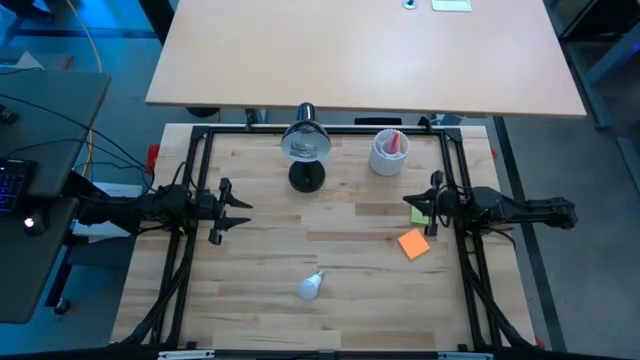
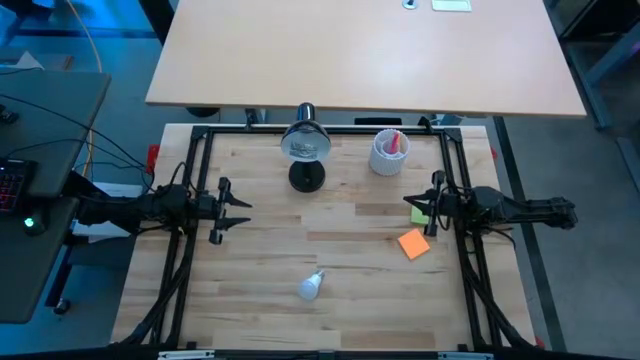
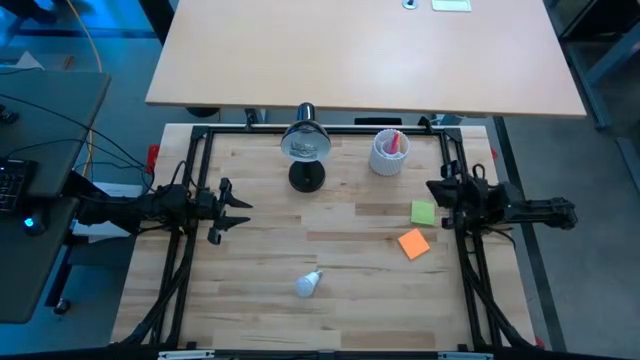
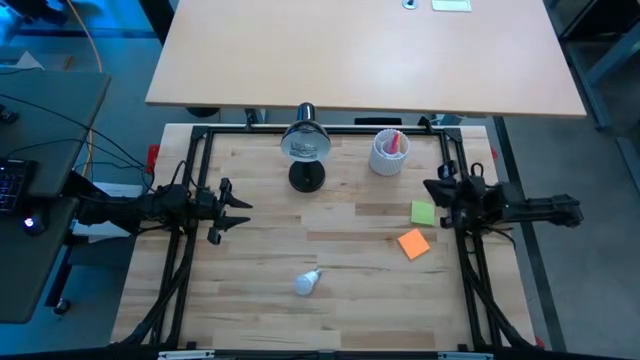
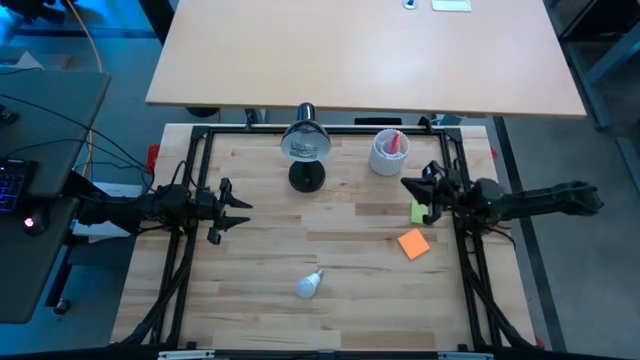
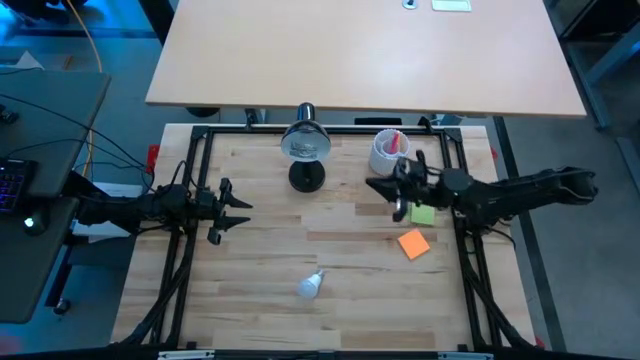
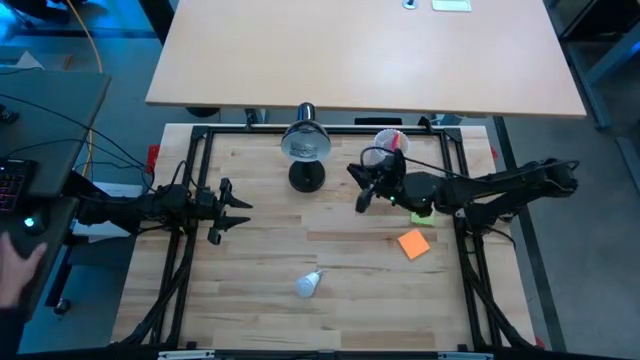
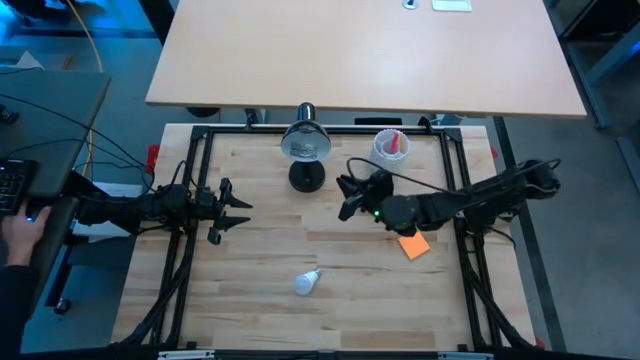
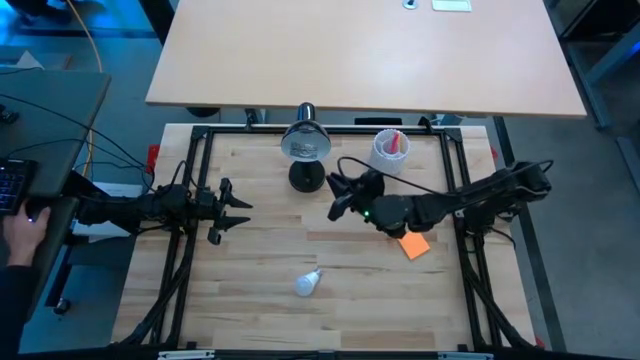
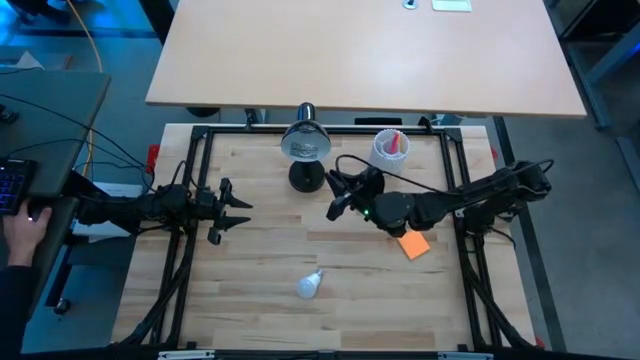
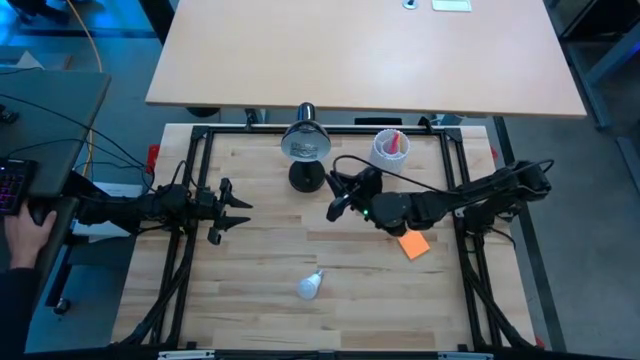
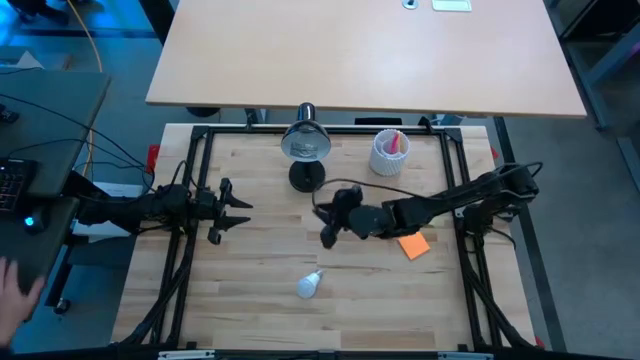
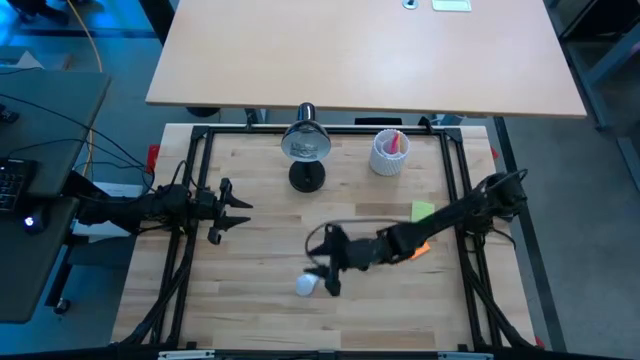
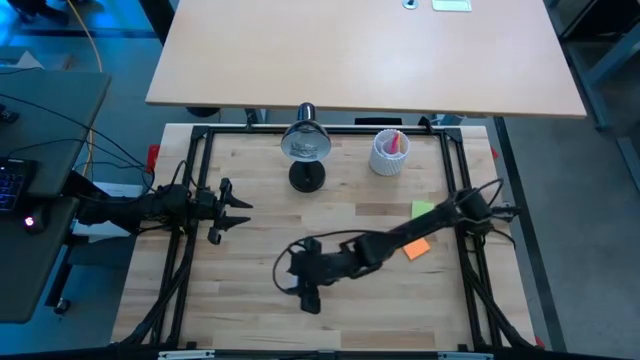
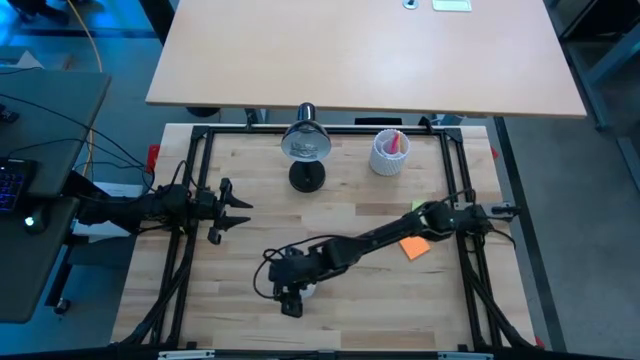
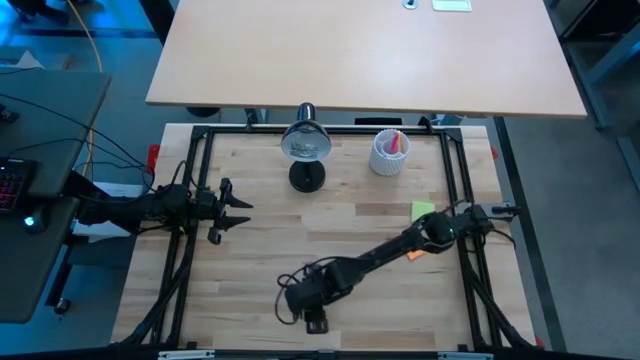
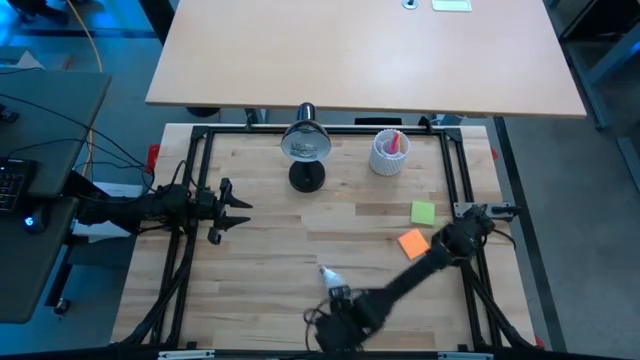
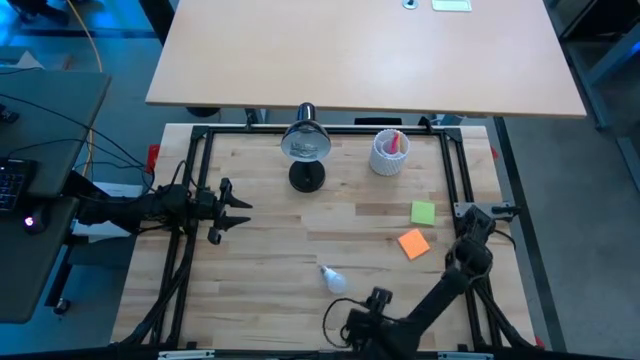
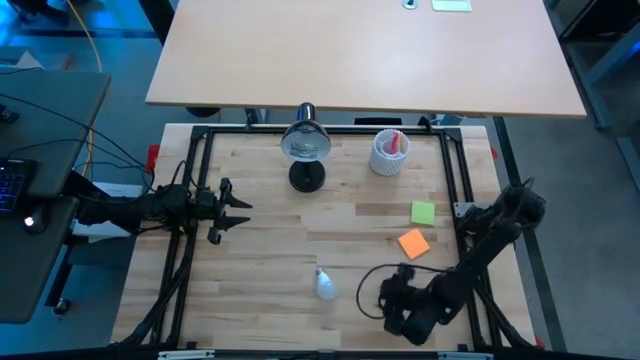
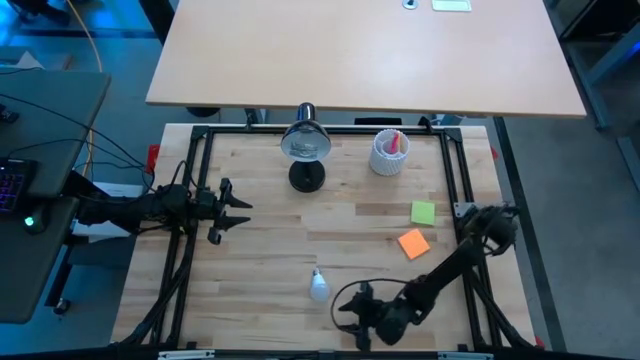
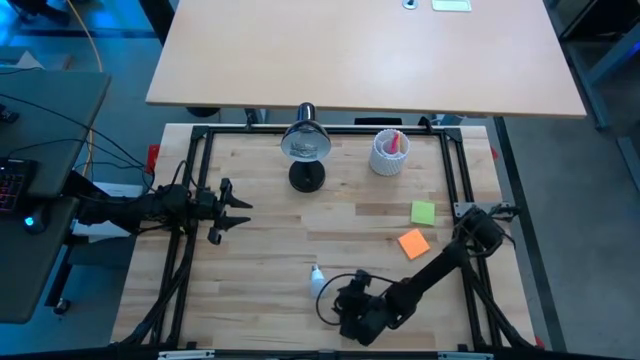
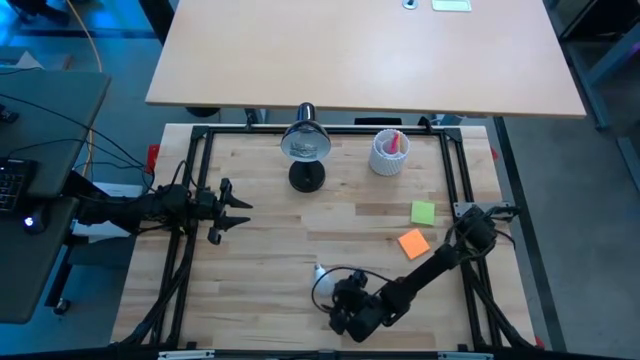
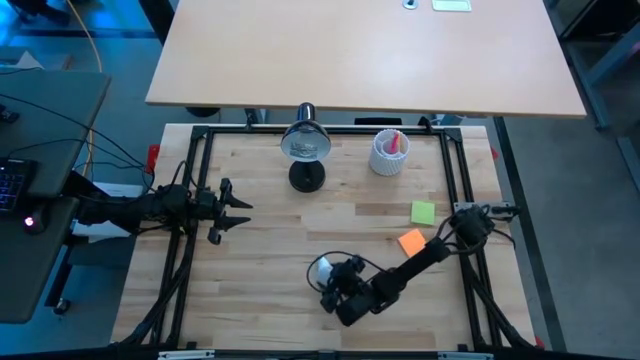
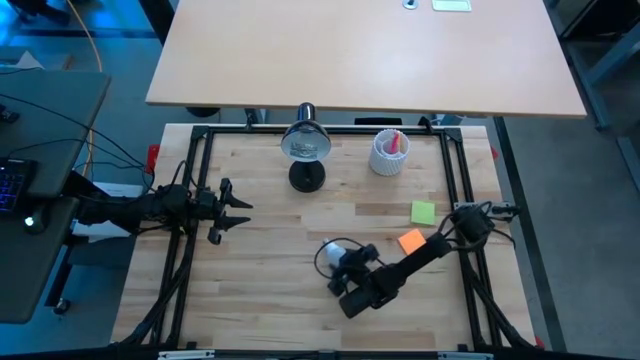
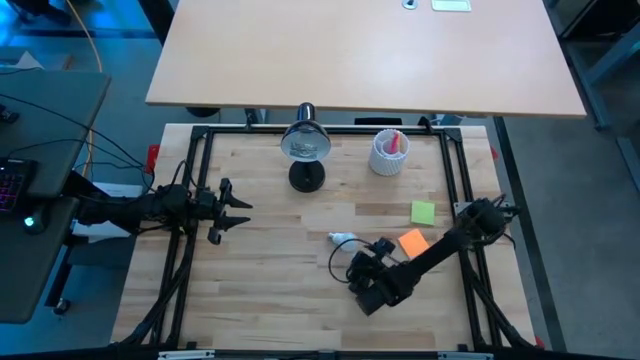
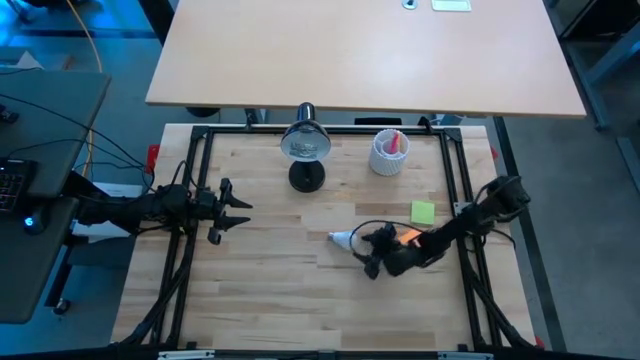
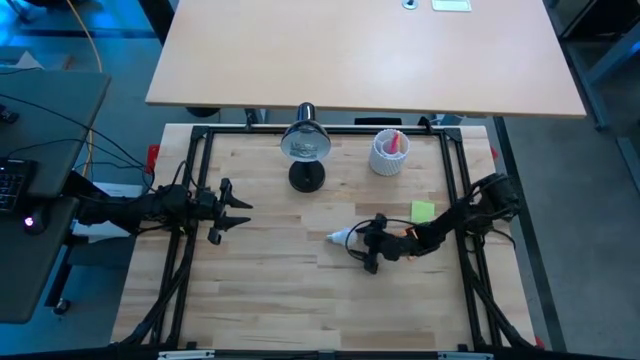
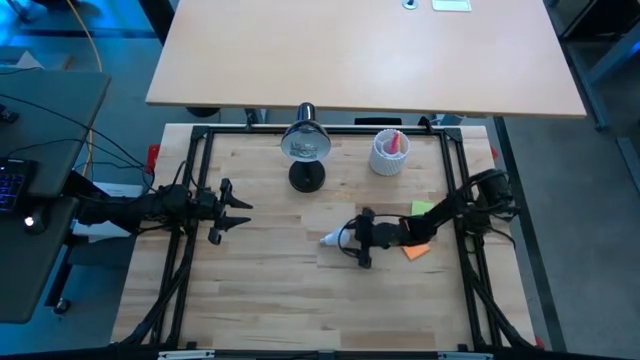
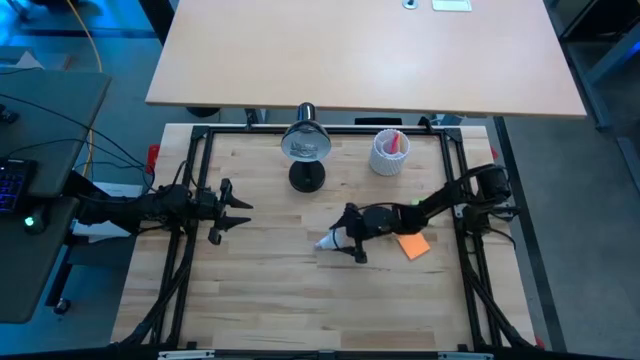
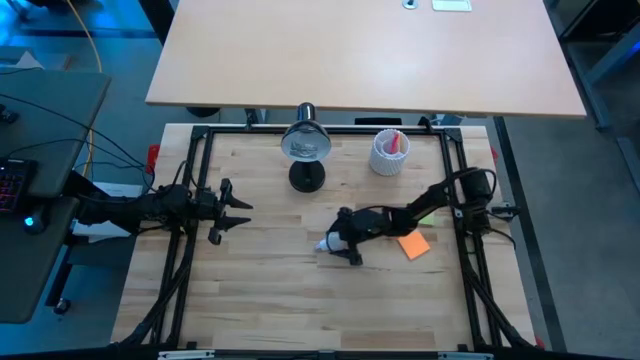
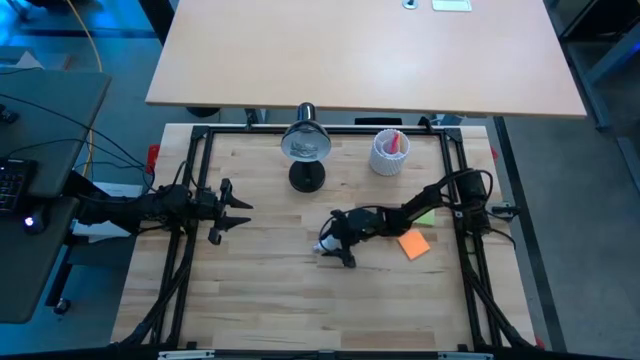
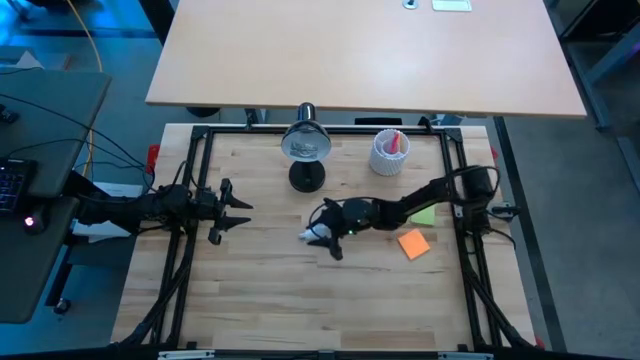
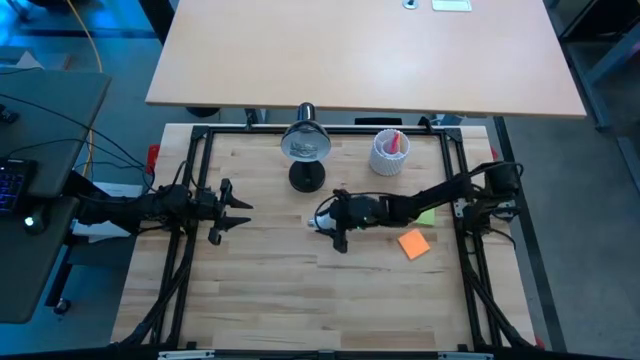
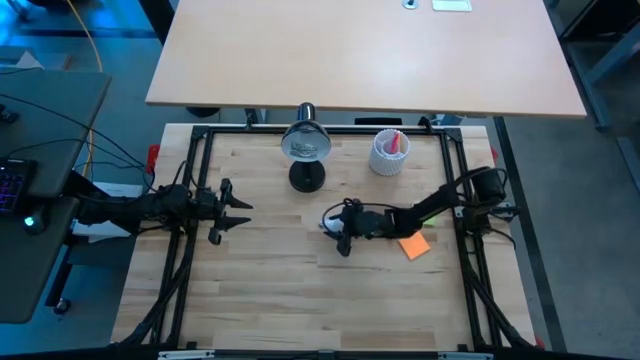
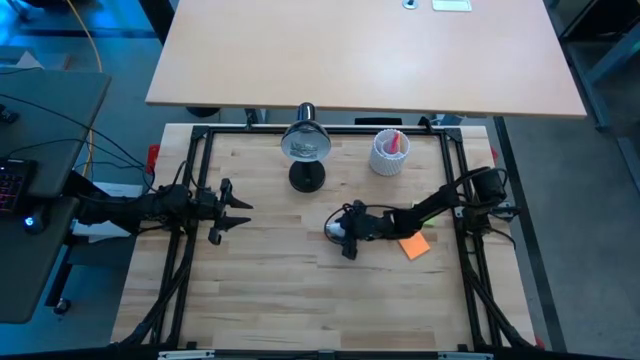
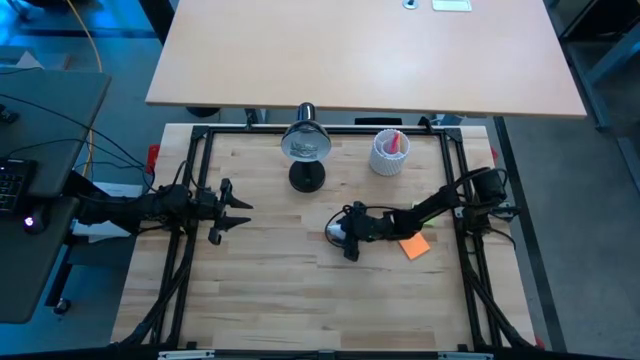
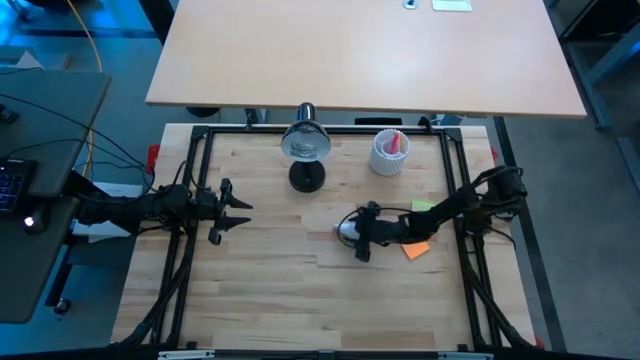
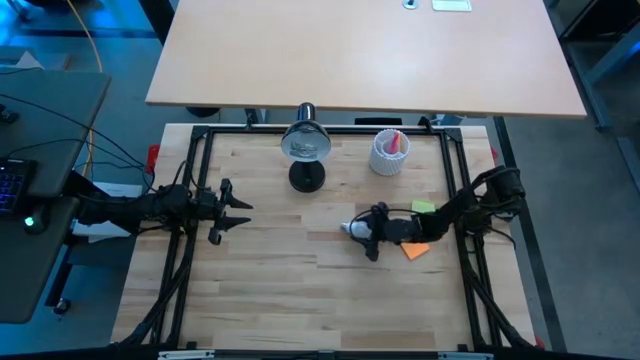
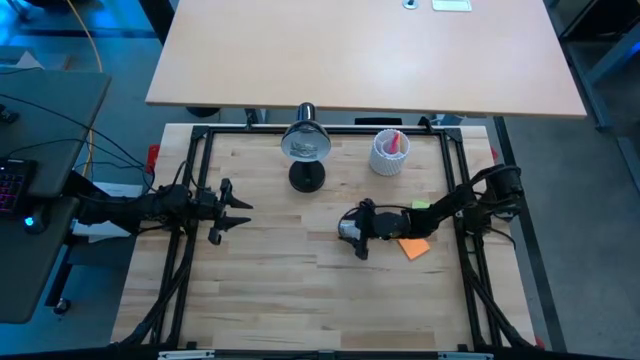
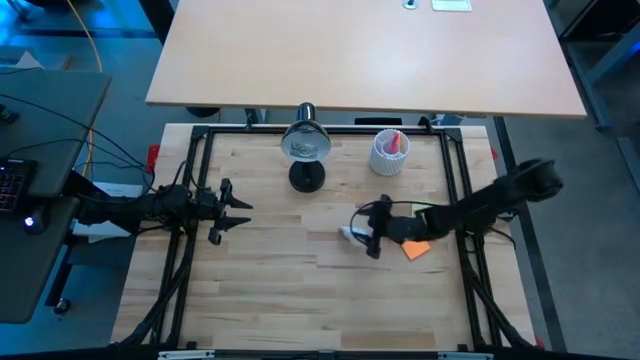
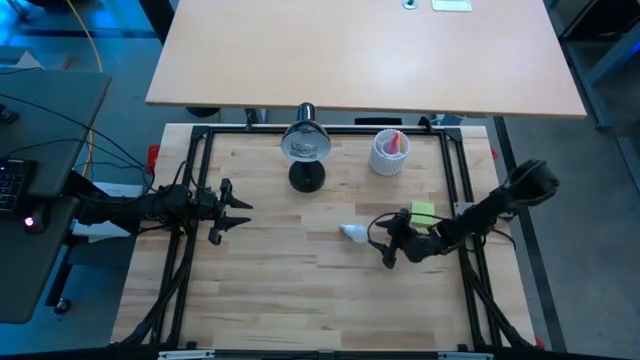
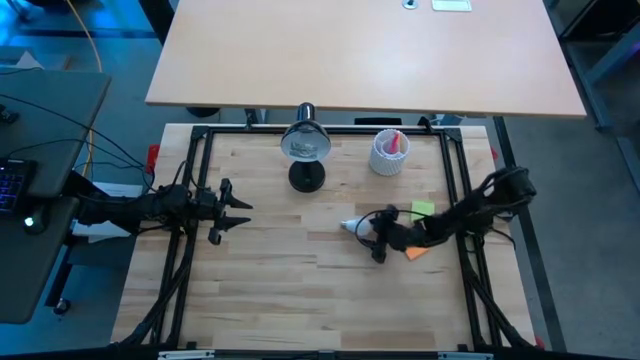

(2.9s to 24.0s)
Task: Screw lightbulb
Insert the lightbulb into the desk lamp
